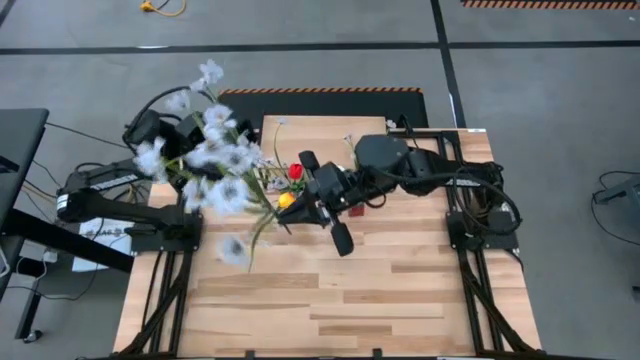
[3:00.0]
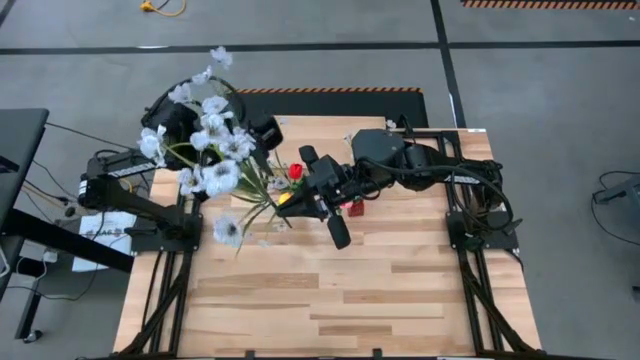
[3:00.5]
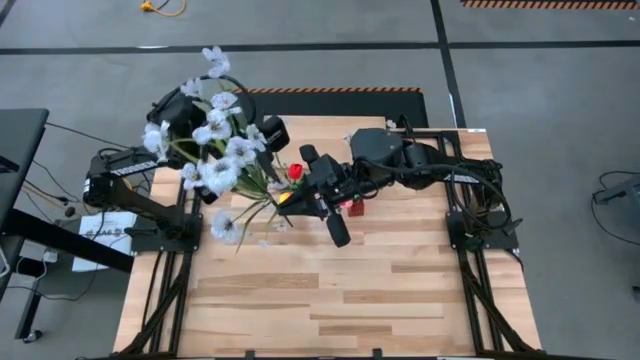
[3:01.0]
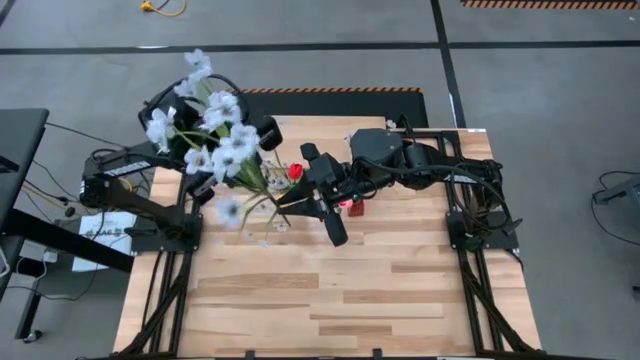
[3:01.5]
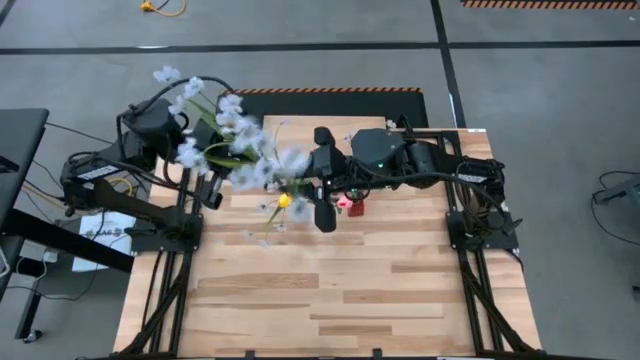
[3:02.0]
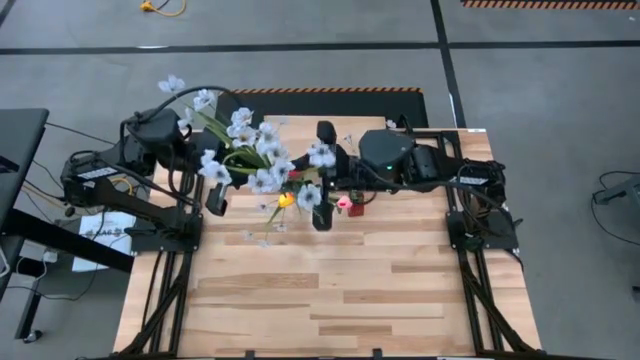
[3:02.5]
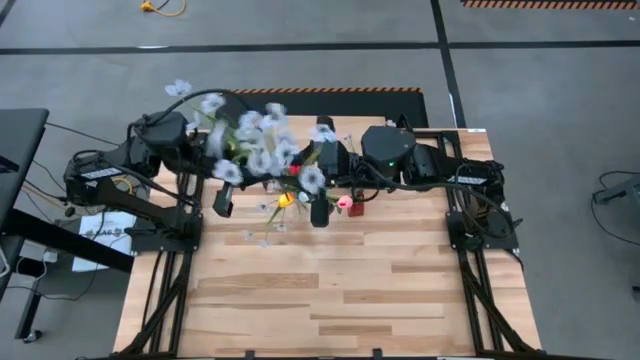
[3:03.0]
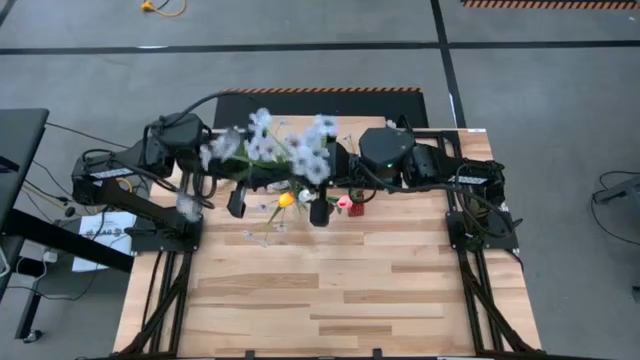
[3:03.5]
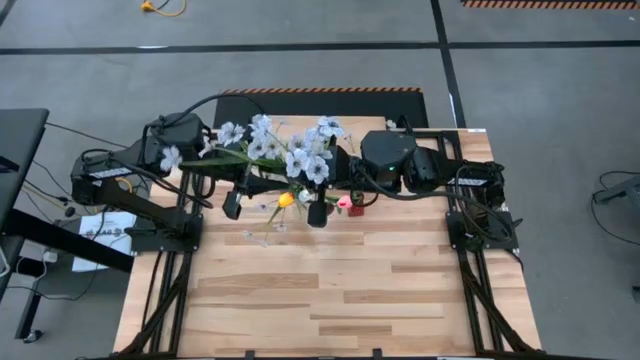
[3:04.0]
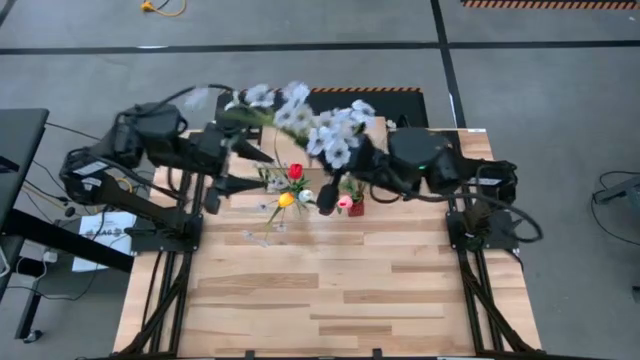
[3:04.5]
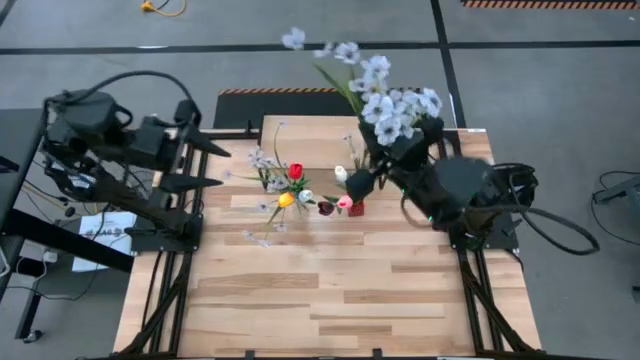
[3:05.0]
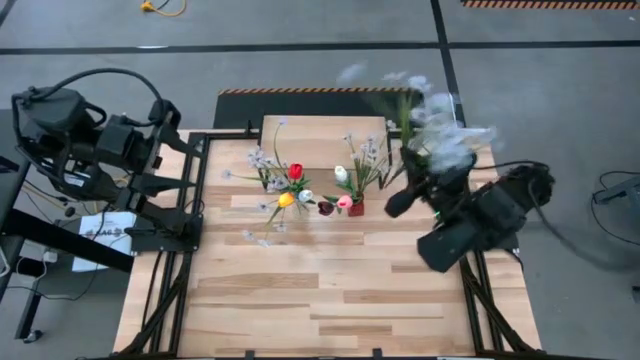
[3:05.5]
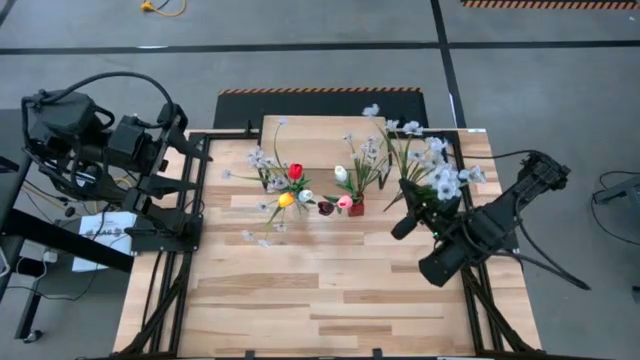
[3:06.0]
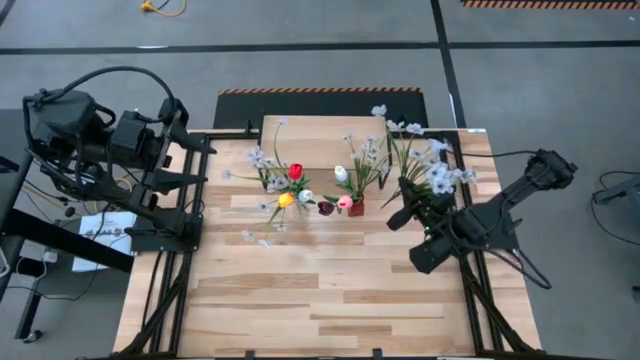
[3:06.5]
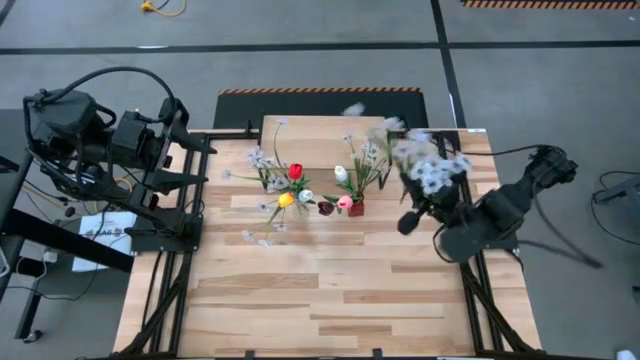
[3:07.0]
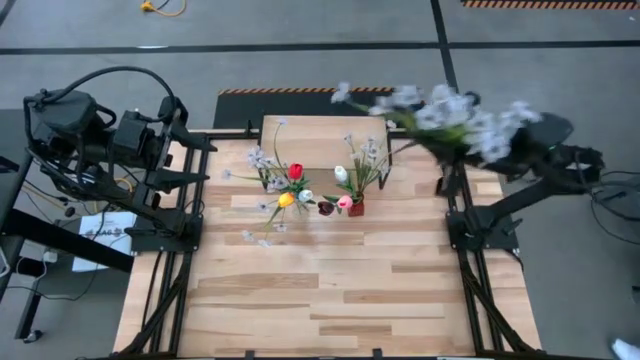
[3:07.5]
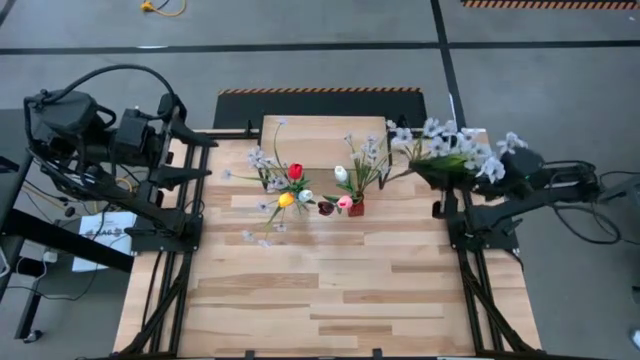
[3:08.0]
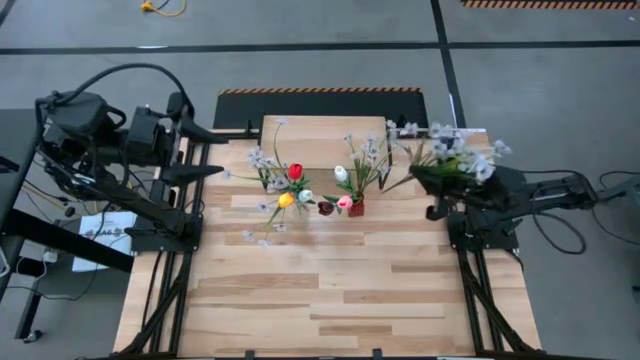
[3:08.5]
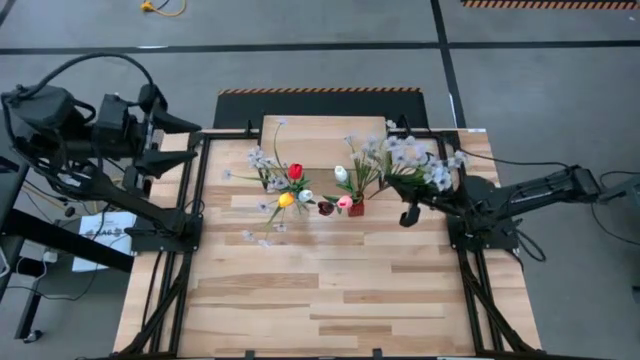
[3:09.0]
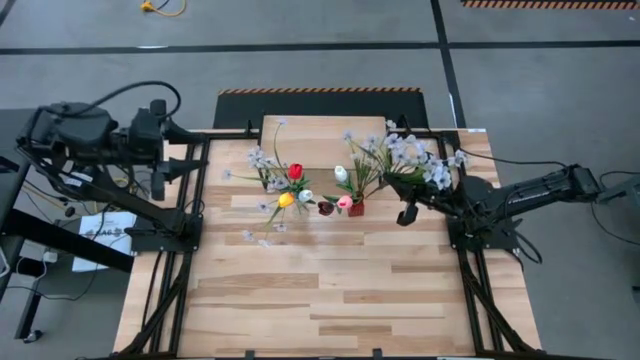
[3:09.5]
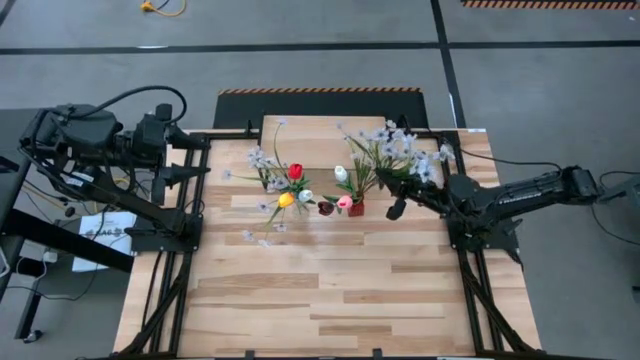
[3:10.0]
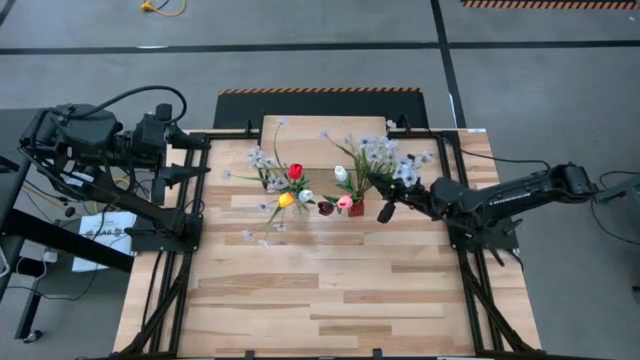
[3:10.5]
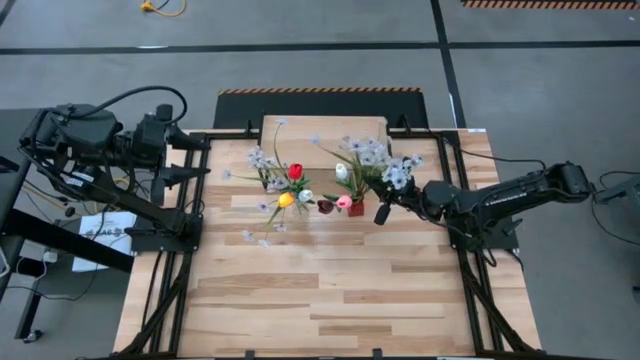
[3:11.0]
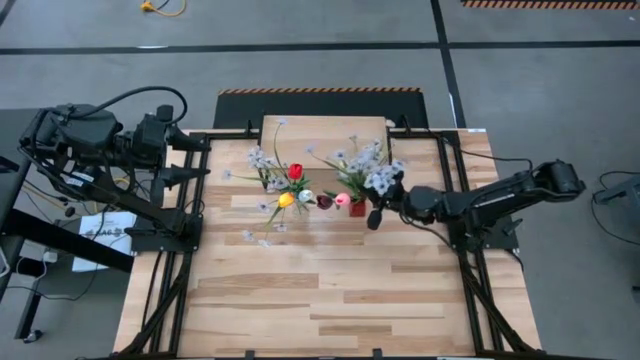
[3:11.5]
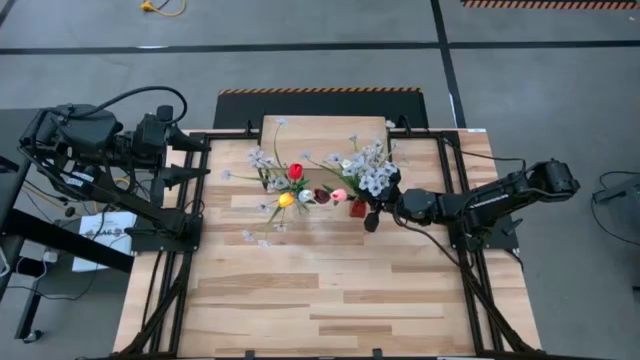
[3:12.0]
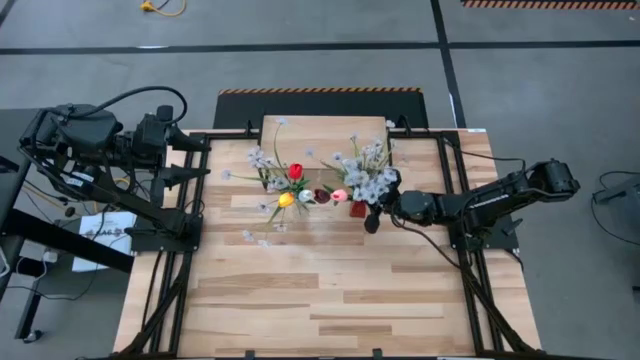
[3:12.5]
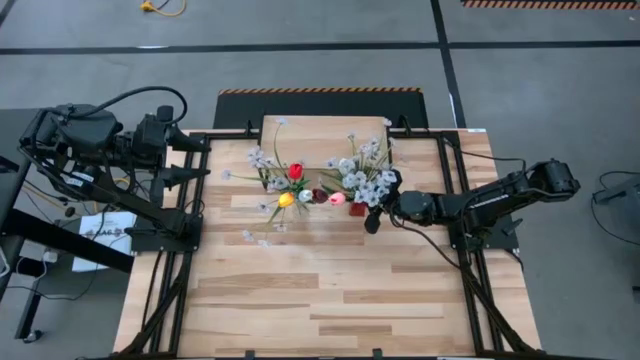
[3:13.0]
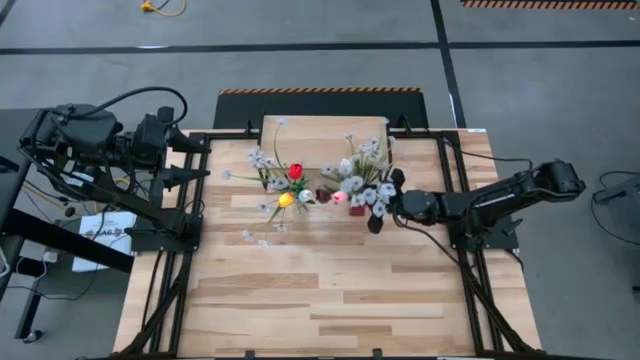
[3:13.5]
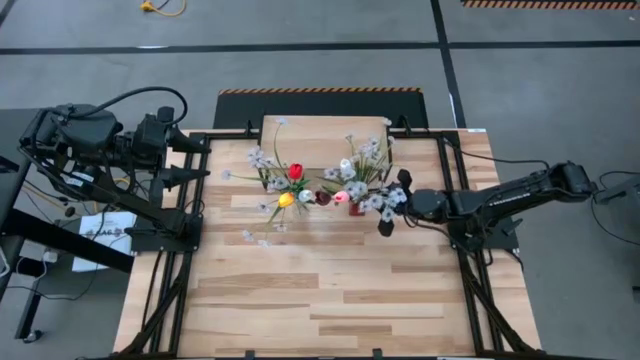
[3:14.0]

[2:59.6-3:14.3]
Task: Pick and place flowers into a vace then onto a shelf
Put the white flower into the red vase

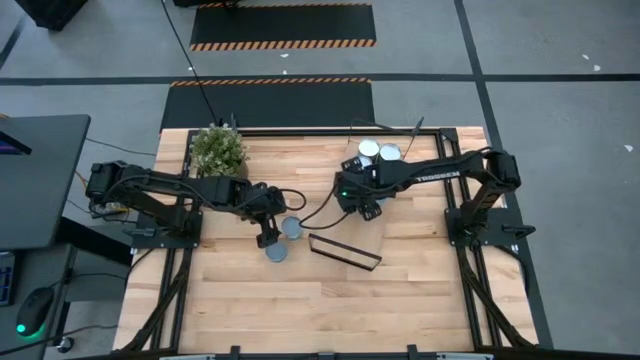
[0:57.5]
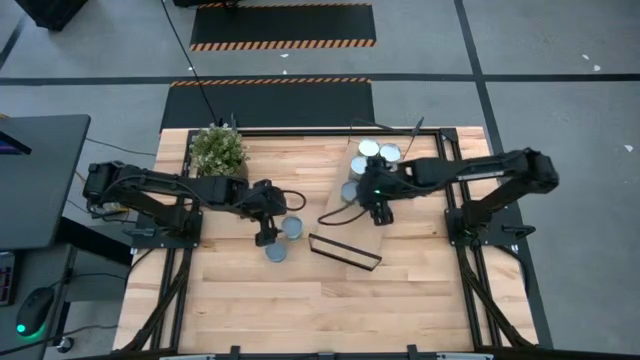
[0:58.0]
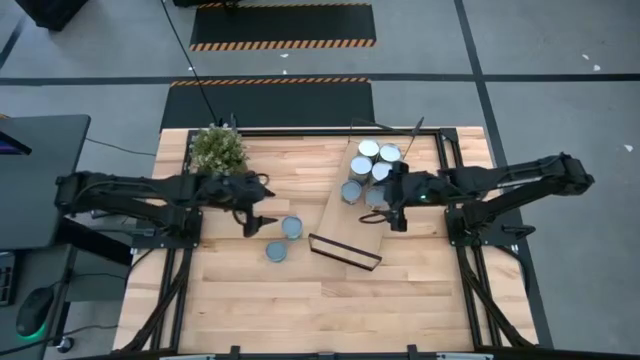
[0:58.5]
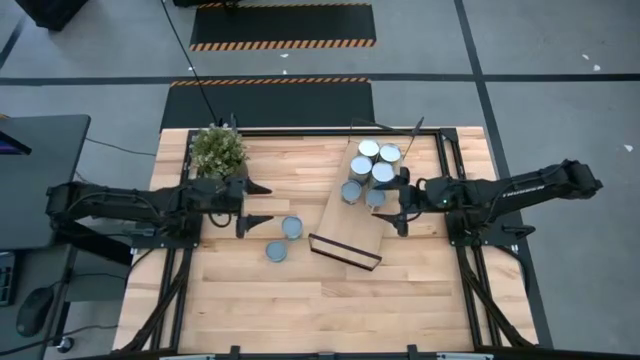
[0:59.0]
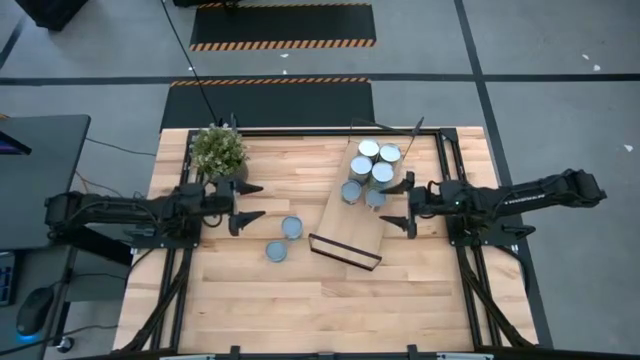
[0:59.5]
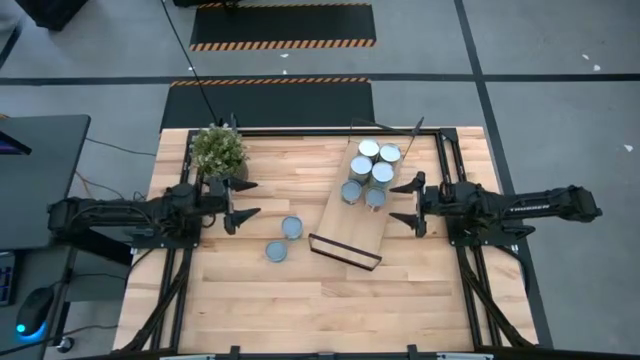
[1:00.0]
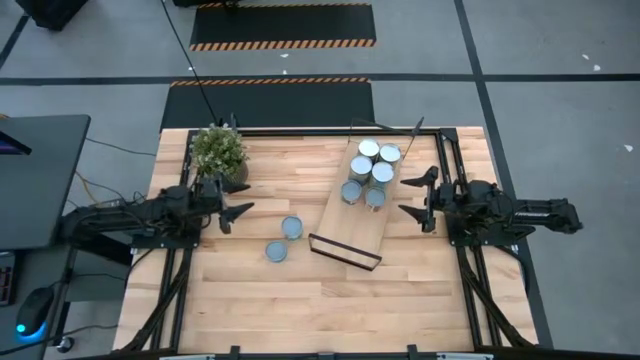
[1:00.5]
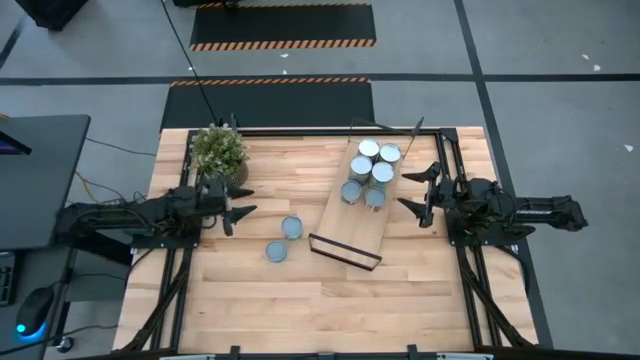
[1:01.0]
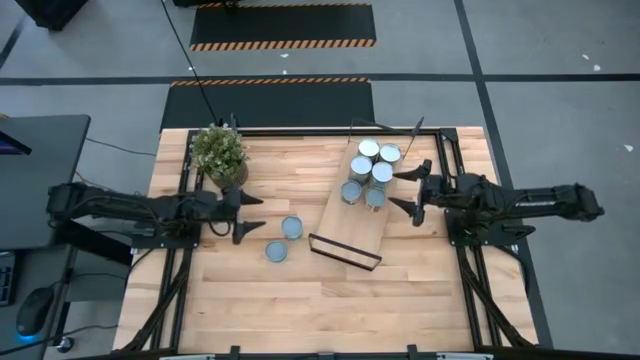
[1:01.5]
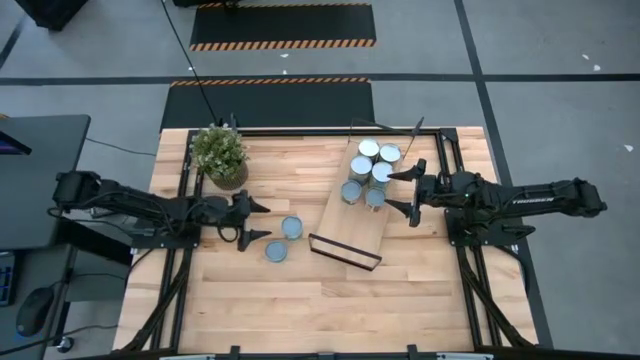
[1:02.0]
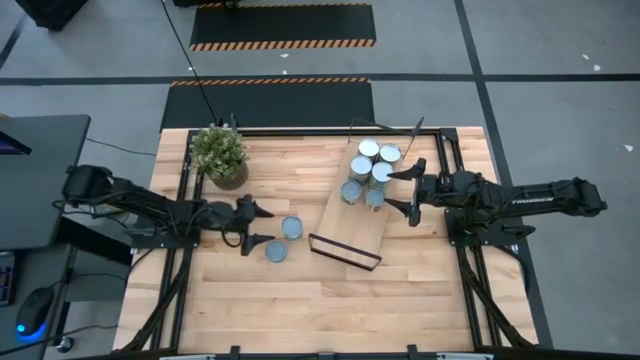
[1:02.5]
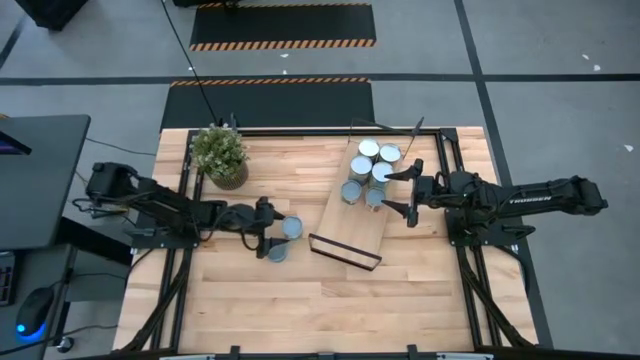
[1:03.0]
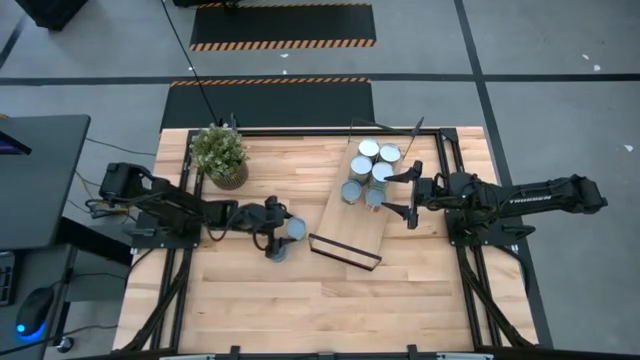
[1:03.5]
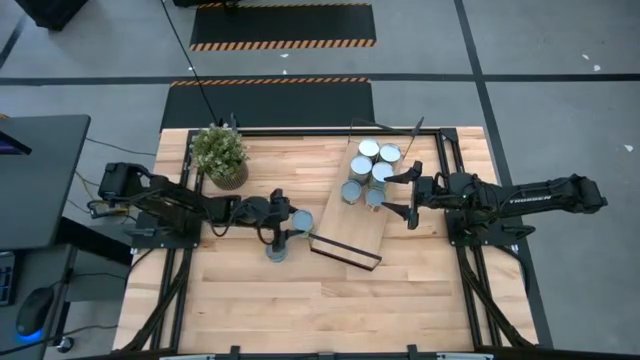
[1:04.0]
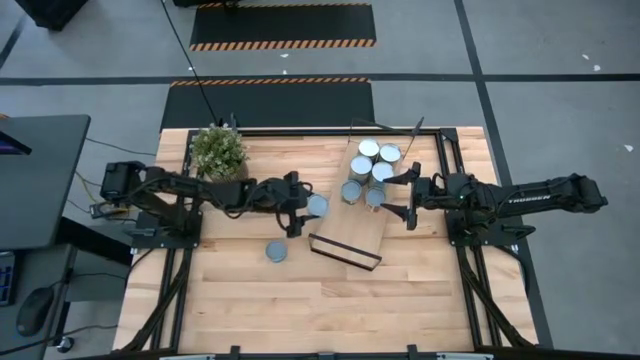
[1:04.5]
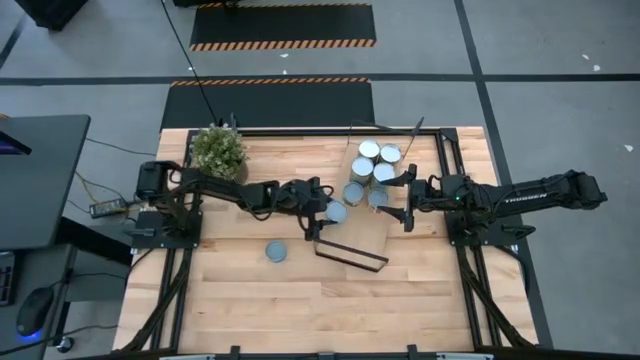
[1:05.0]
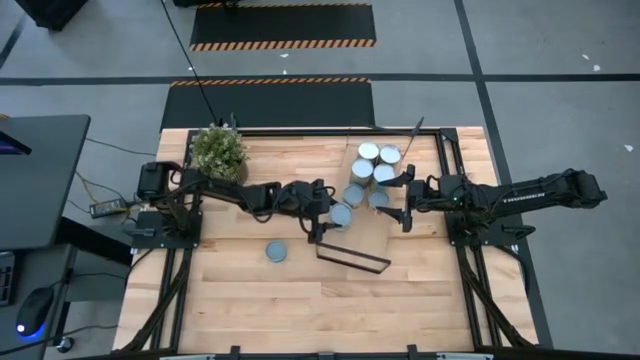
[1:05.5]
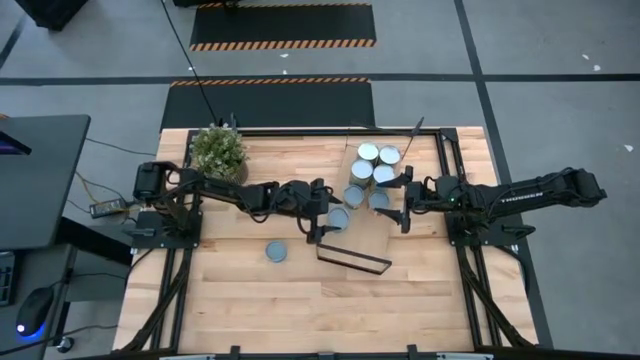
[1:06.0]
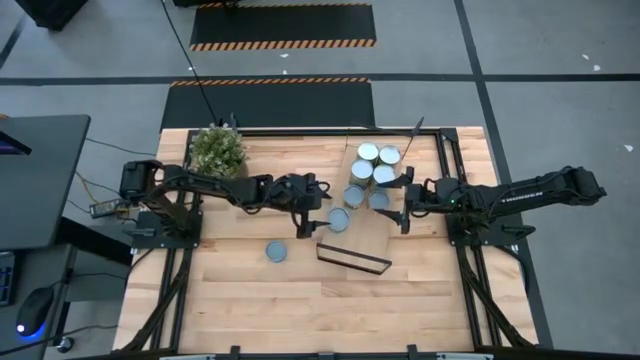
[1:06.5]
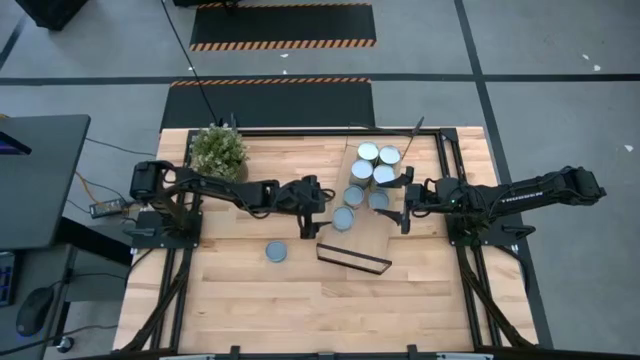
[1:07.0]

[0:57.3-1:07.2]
Task: Pick and place cans onto a shelf
Put the canned mixed vegetables on the shelf
